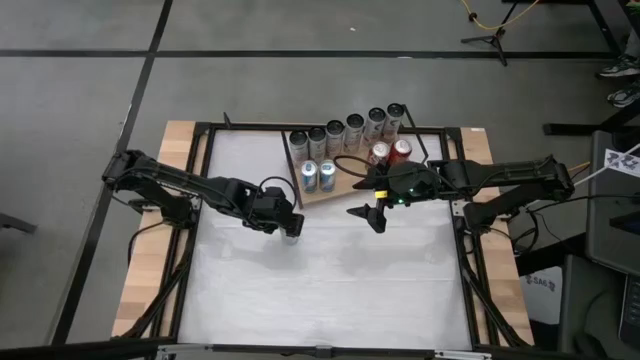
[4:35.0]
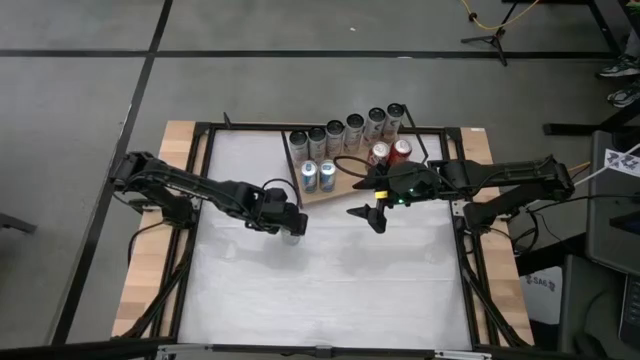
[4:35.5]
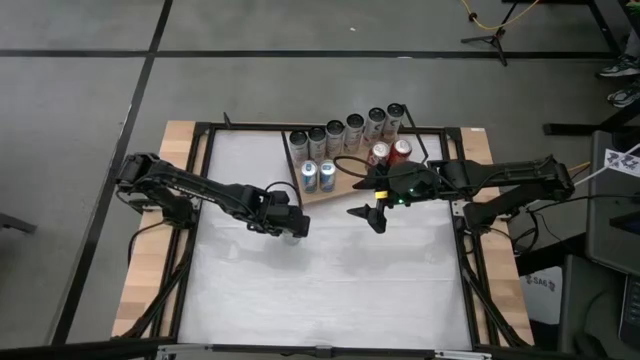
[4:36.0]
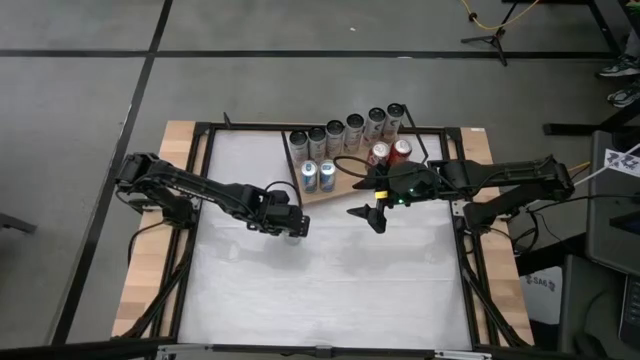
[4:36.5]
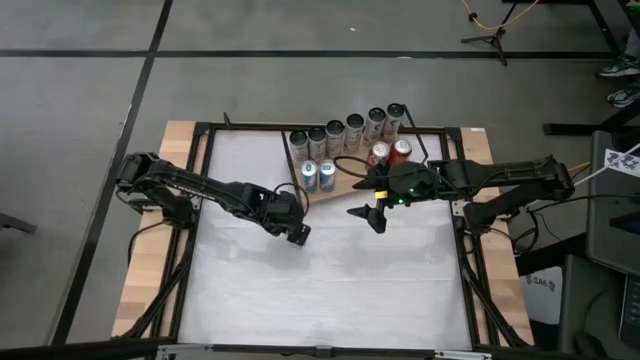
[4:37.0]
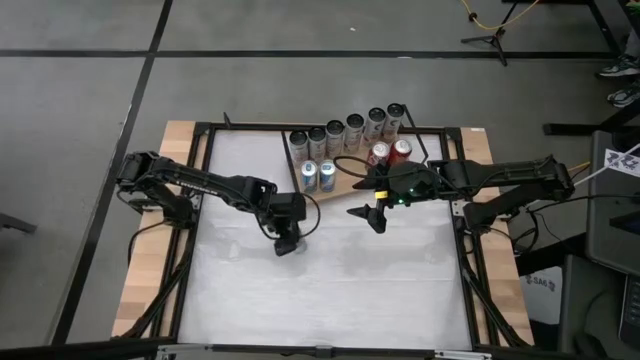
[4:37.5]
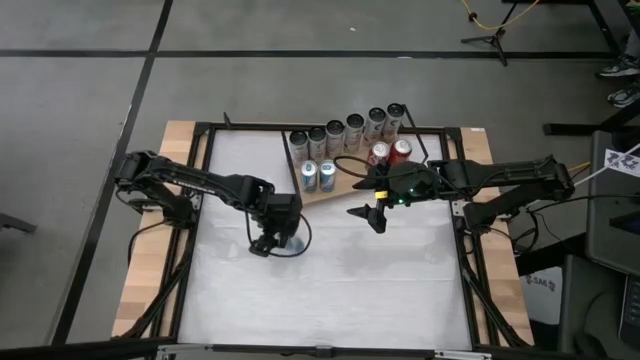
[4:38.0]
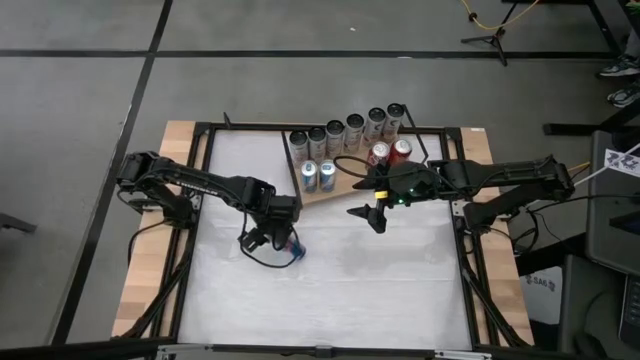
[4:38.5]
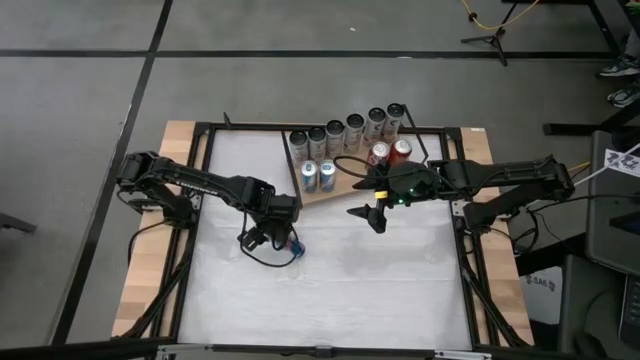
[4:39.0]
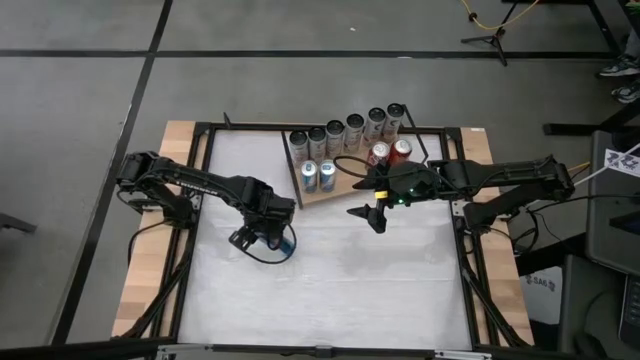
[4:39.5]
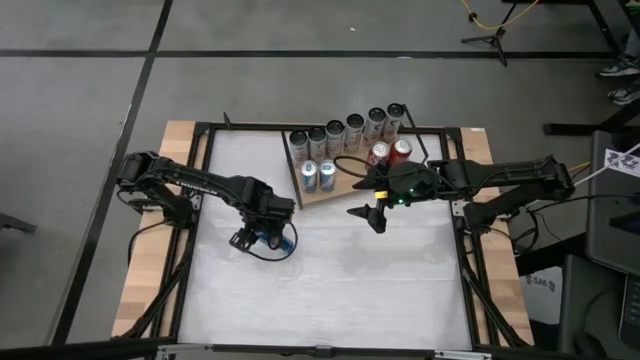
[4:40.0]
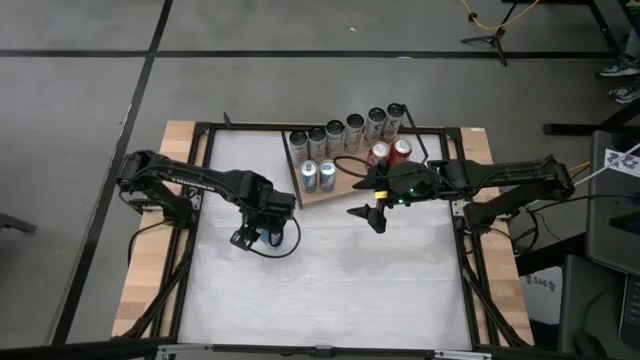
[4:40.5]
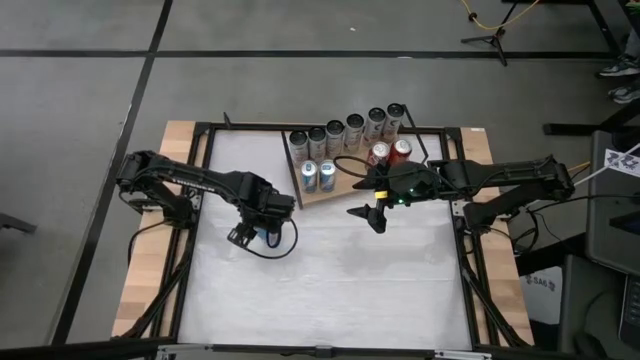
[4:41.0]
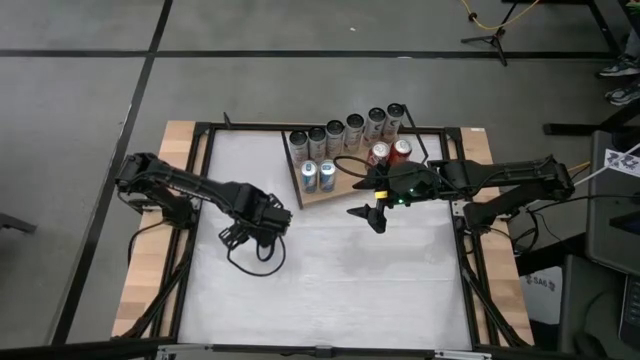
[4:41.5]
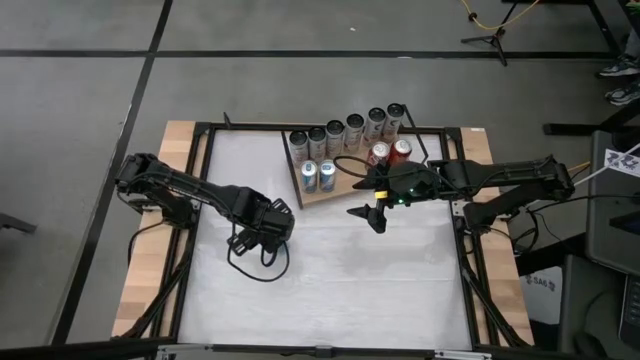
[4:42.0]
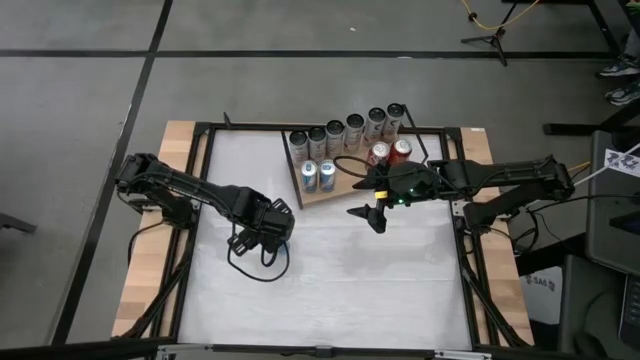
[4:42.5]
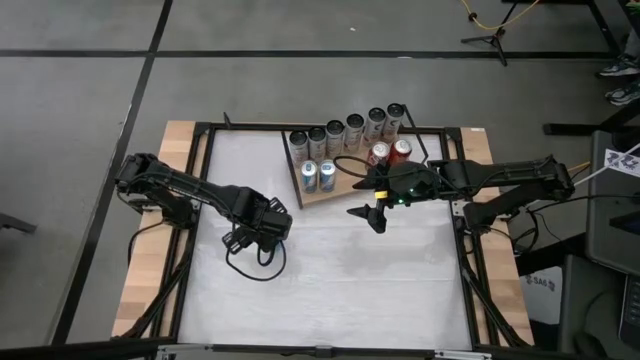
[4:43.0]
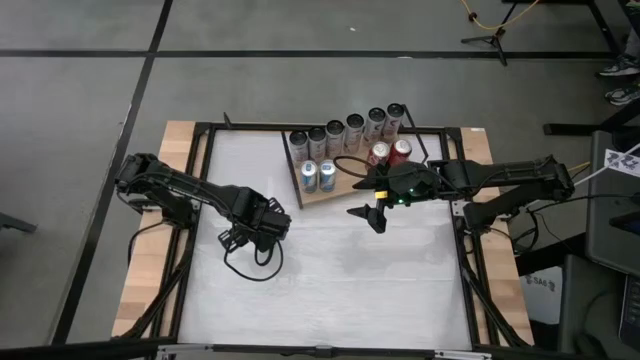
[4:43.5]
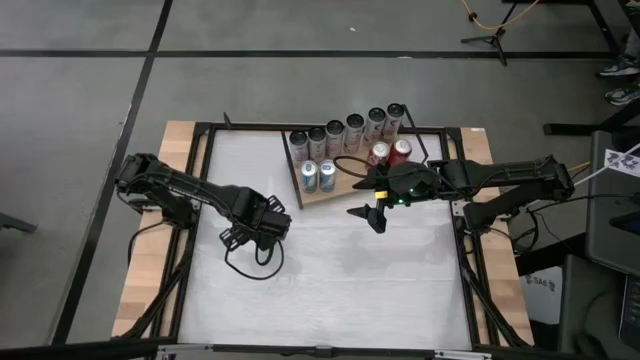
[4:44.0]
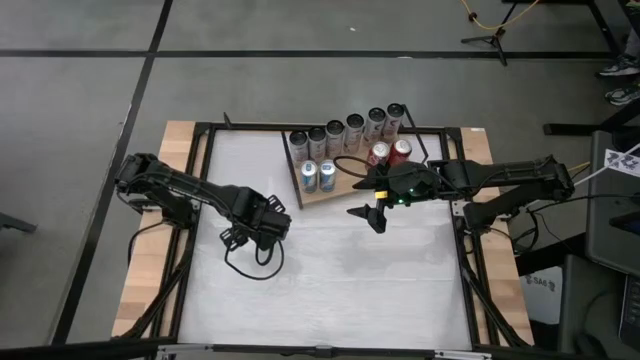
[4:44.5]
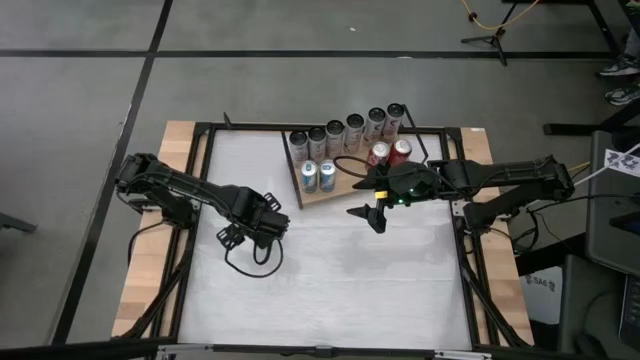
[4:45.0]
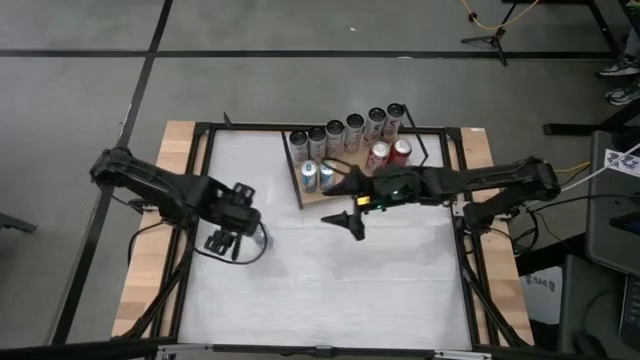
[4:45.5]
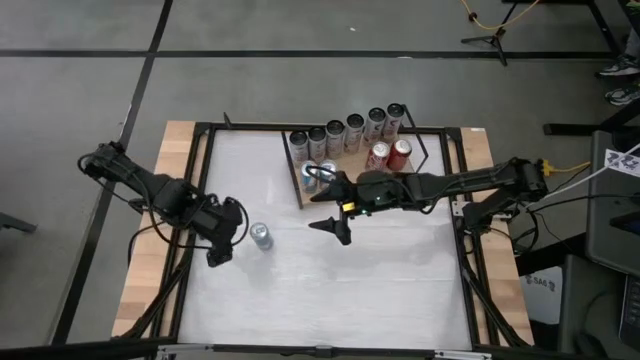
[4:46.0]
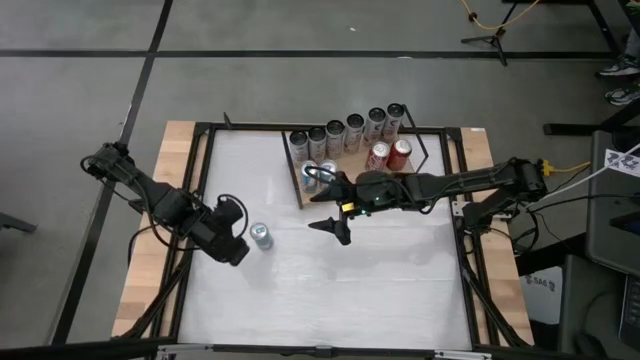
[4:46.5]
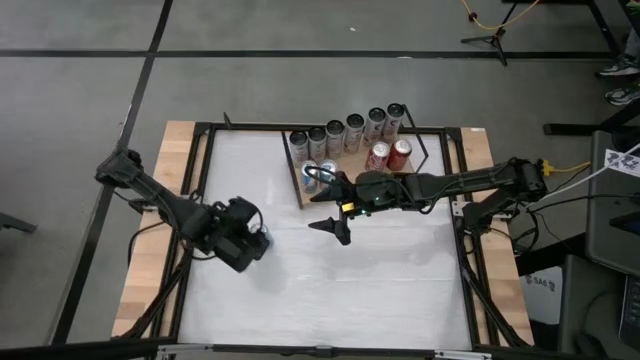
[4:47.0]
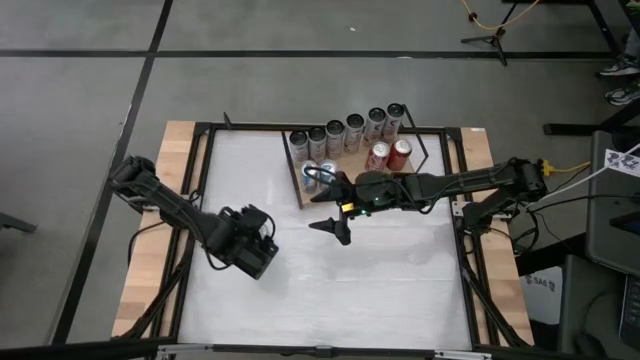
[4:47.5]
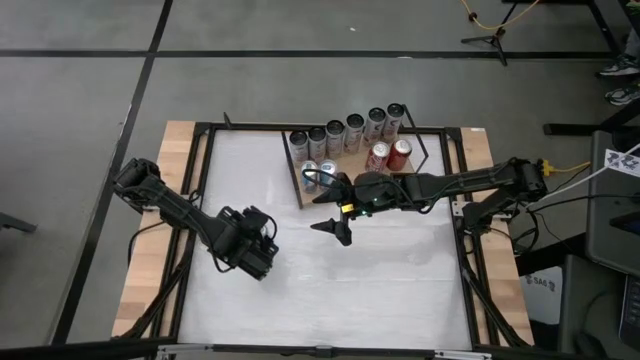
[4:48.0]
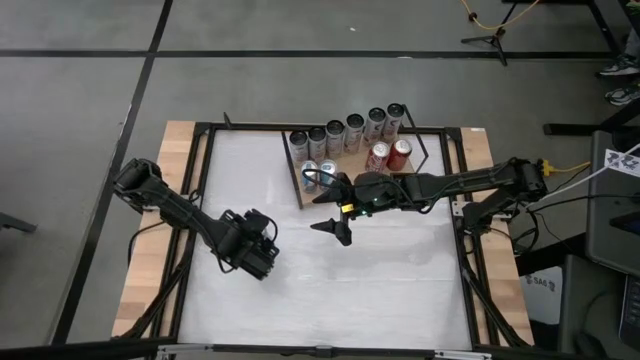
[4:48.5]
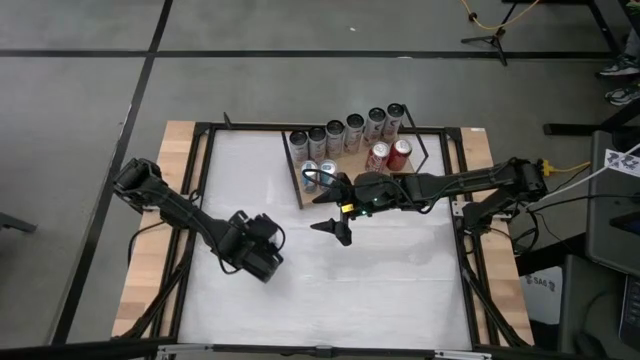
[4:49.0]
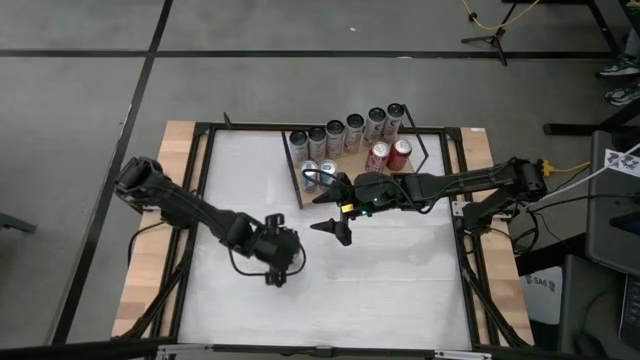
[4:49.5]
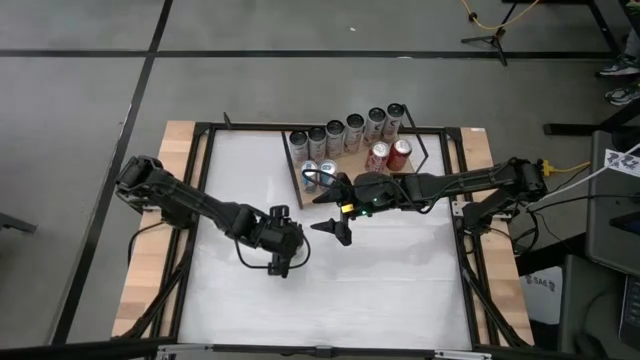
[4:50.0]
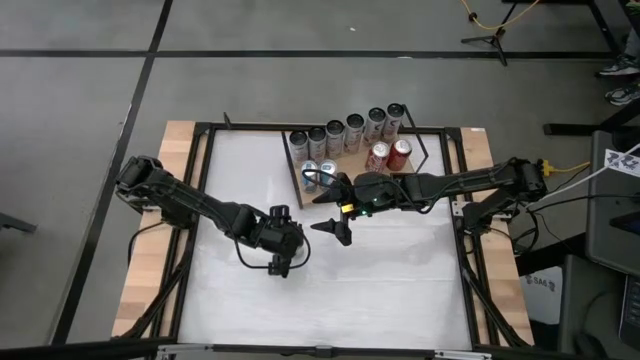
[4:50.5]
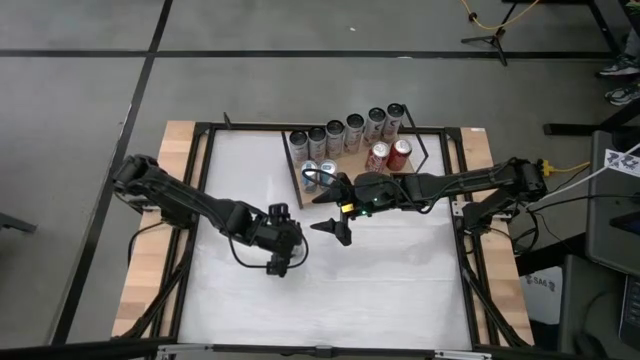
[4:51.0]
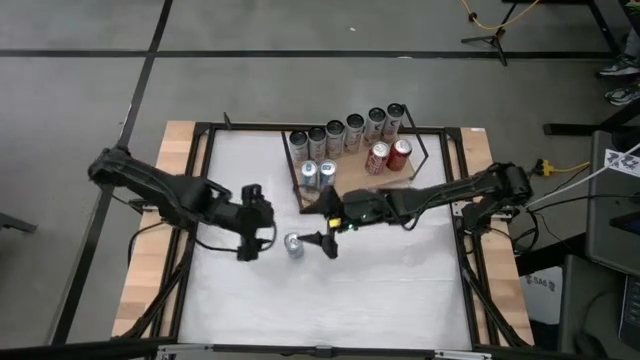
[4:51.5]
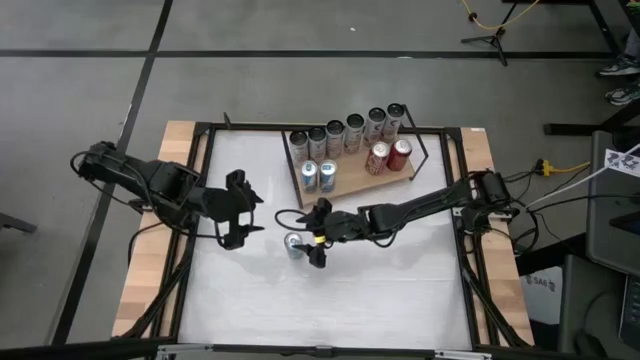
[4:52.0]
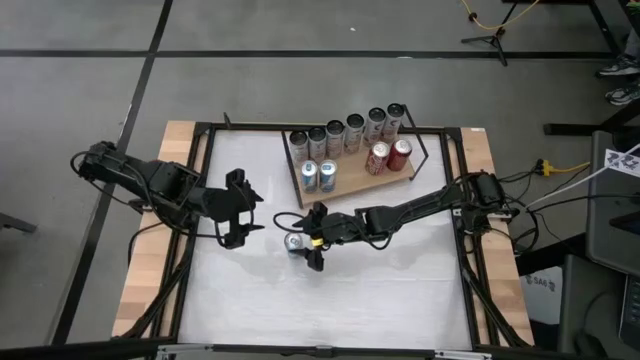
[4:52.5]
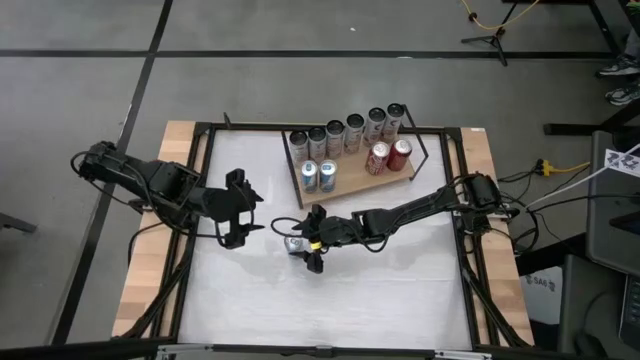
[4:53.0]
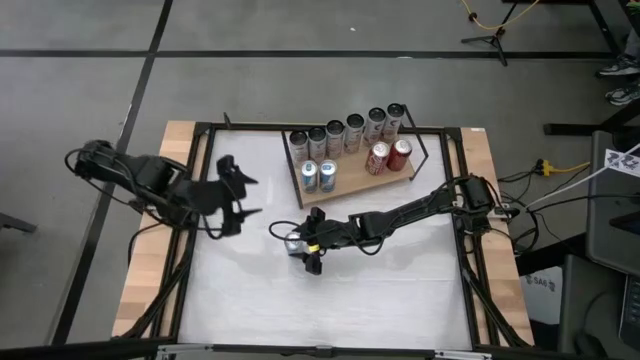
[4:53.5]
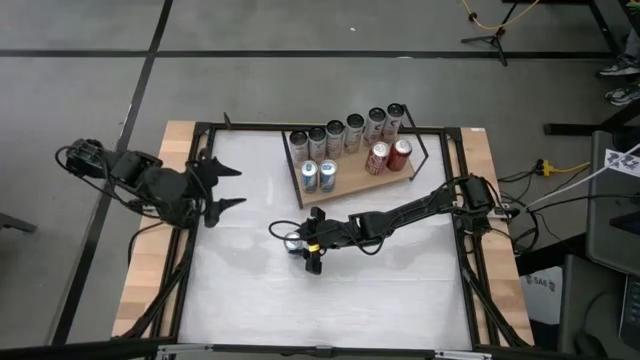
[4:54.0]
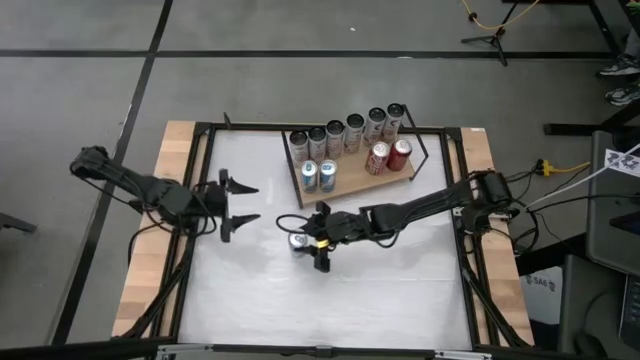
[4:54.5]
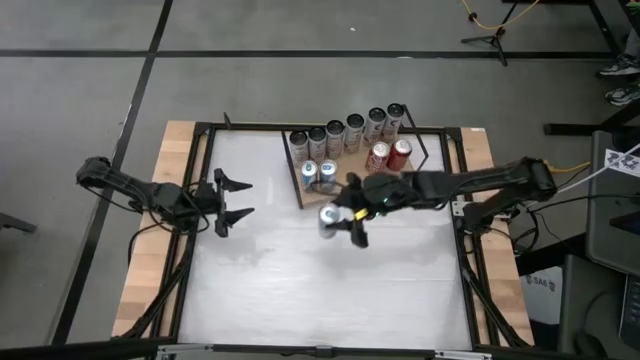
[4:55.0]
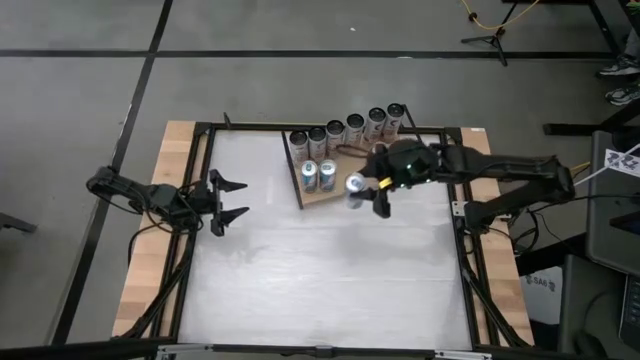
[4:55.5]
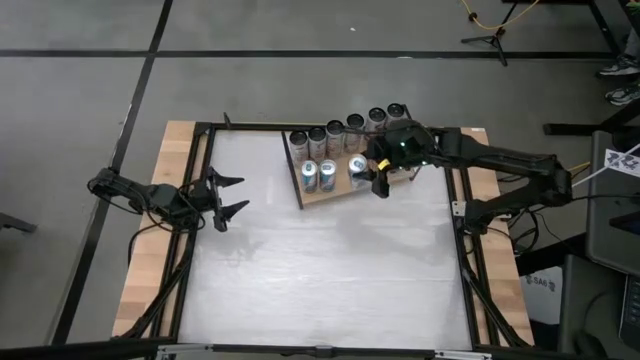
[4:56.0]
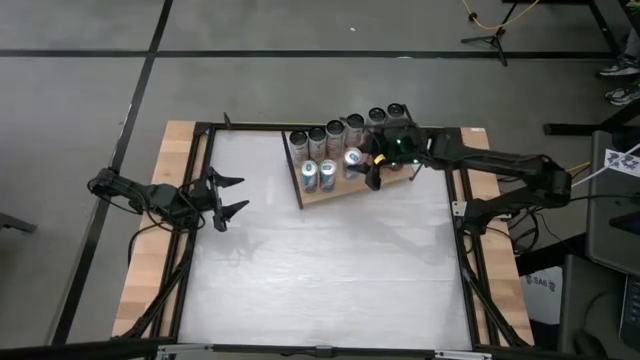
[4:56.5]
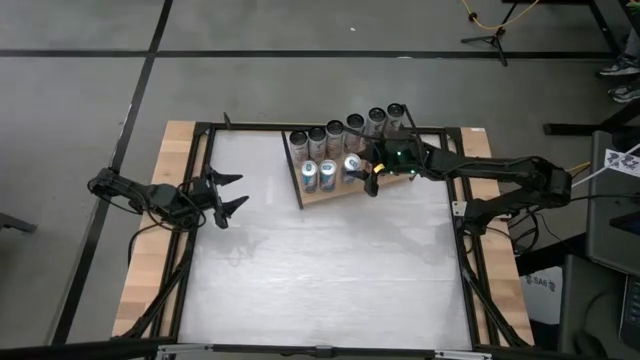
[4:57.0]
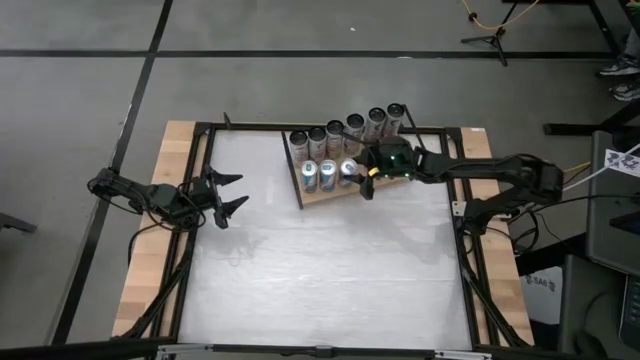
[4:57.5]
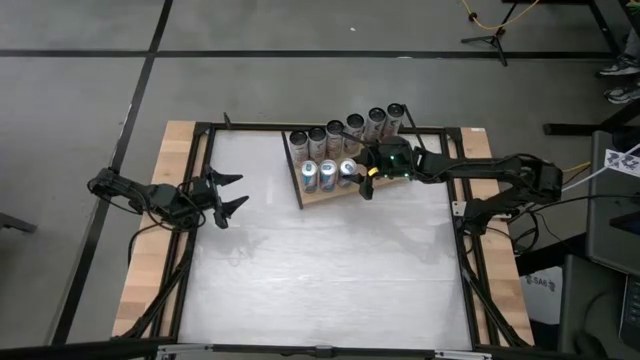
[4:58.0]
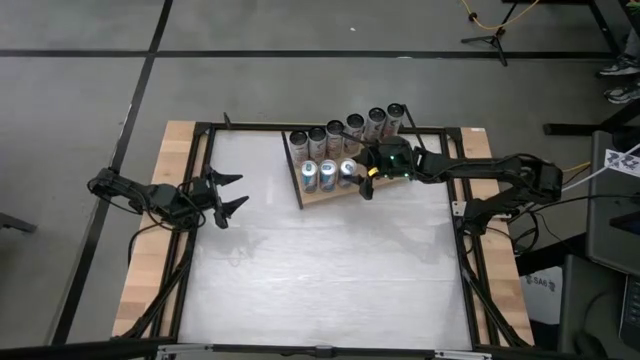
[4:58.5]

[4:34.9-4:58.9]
Task: Place canned beverage on shelf
Put the blue soda can on the shelf aligned with the other blue soda cans
